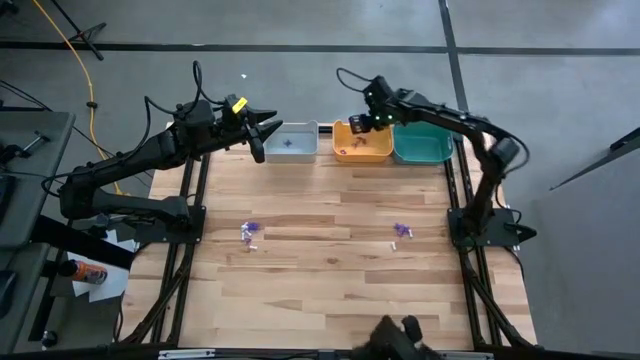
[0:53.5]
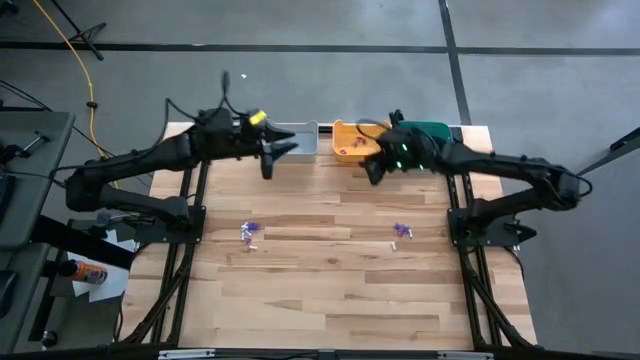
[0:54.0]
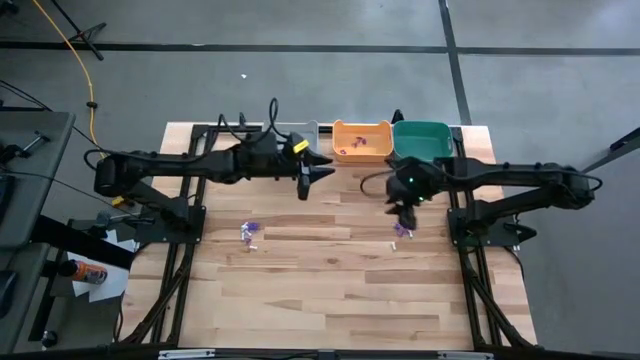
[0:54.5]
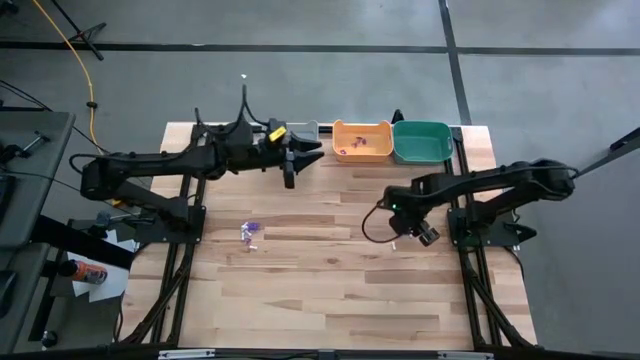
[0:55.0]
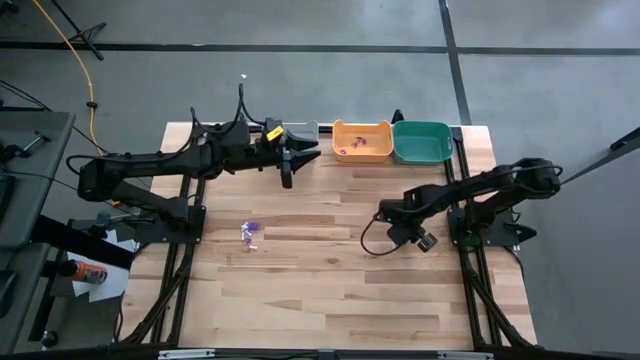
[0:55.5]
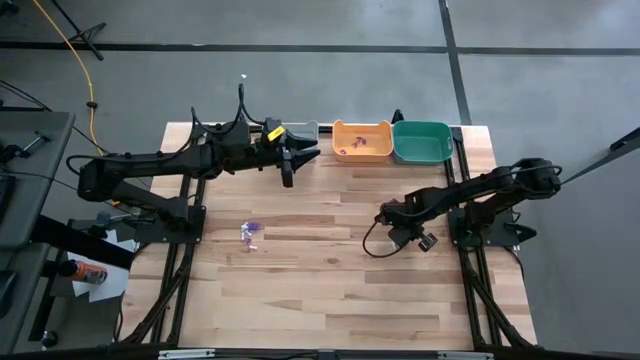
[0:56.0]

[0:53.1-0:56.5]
Task: Sort Halloween decoration
Put the purple witch hat toy into the orange bin

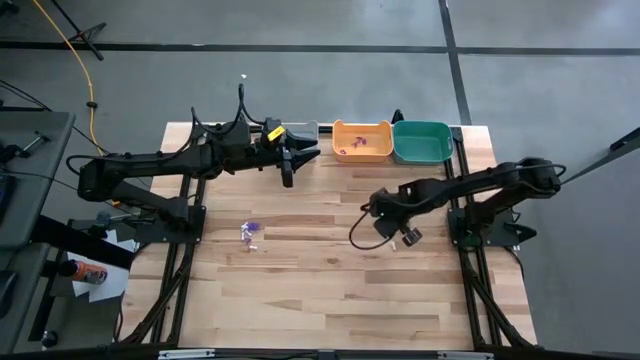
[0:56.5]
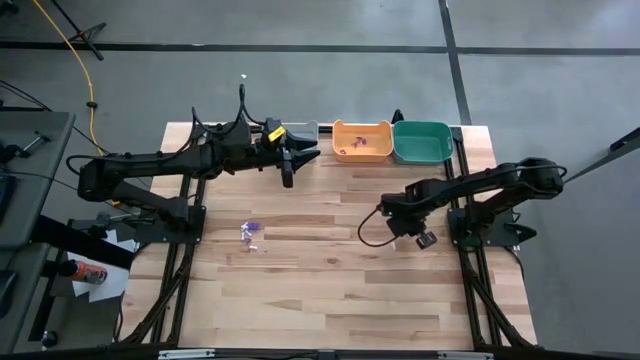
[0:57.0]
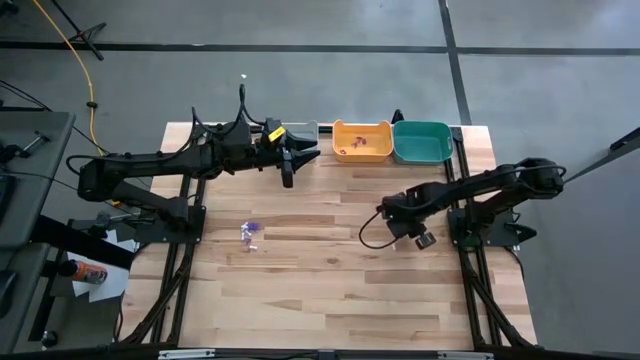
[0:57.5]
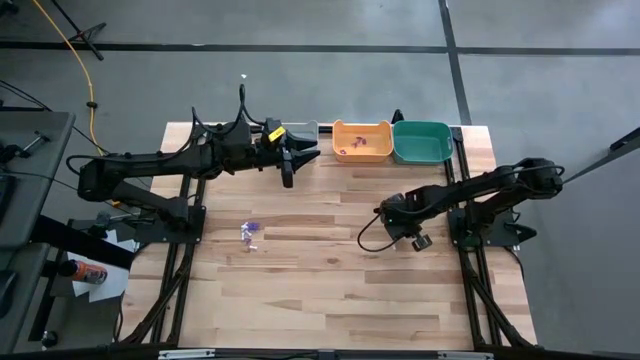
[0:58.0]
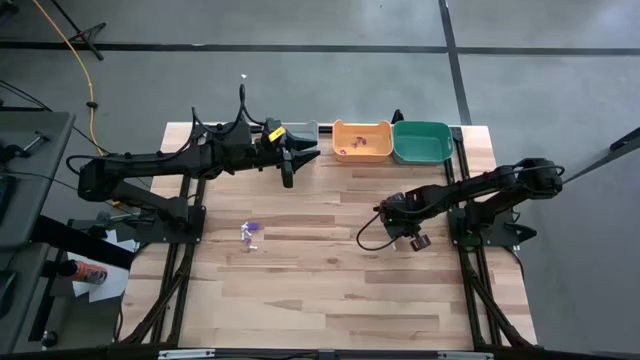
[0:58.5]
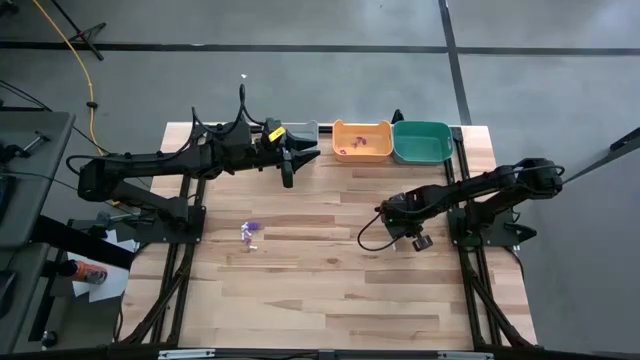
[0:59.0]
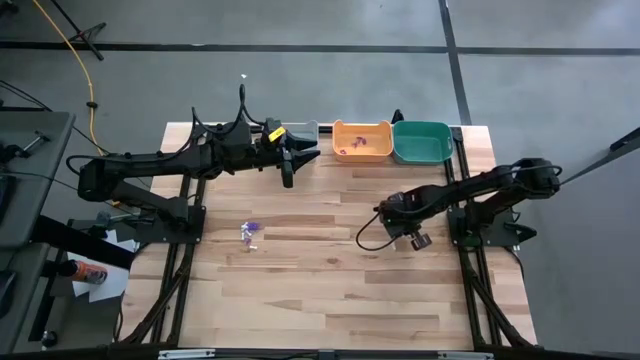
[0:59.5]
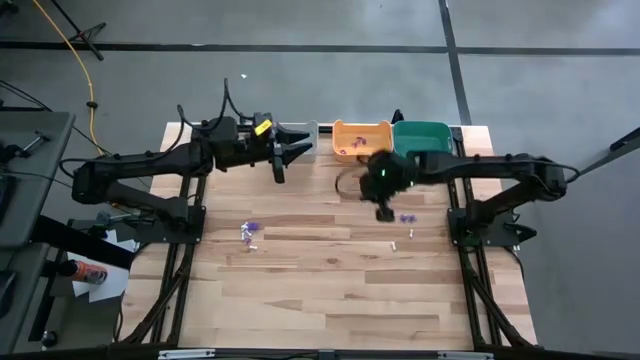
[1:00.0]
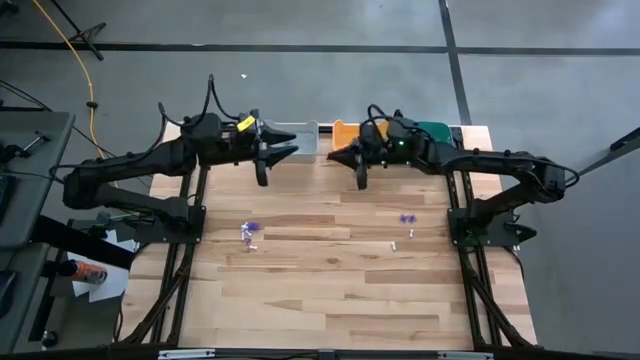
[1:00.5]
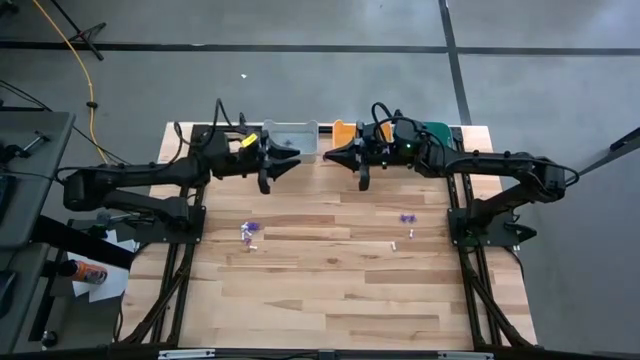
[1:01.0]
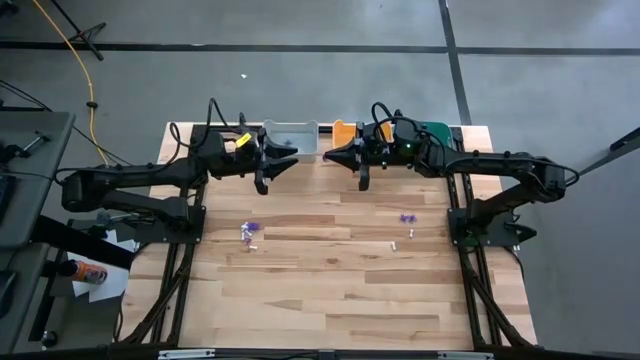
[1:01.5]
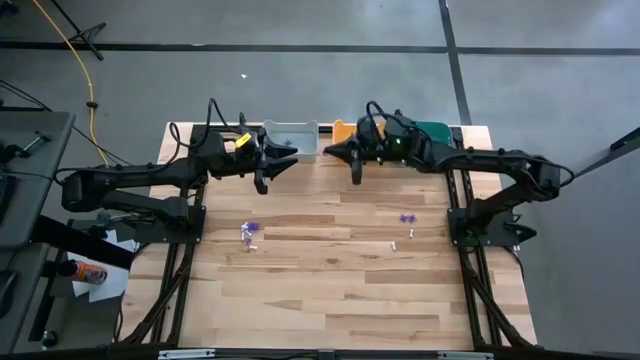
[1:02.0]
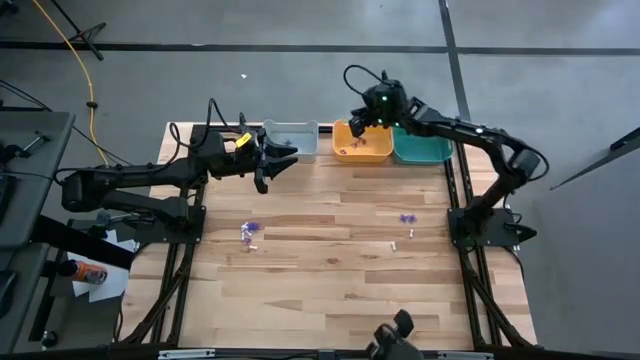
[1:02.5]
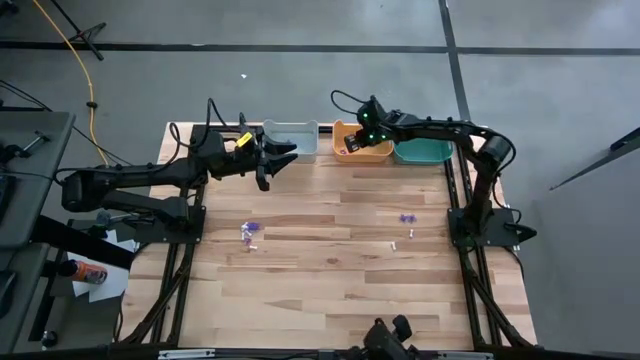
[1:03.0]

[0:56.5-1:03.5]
Put the purple witch hat toy into the orange bin

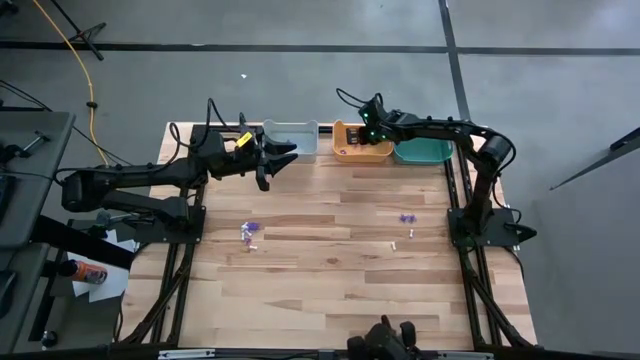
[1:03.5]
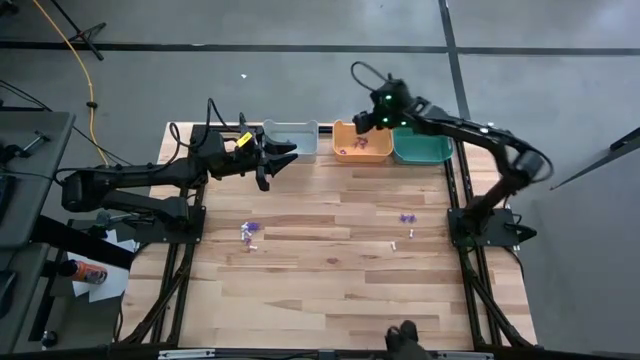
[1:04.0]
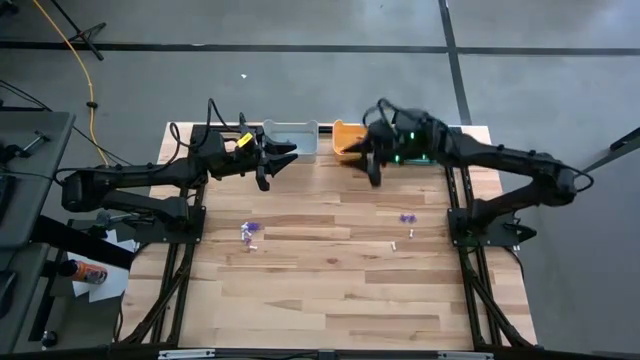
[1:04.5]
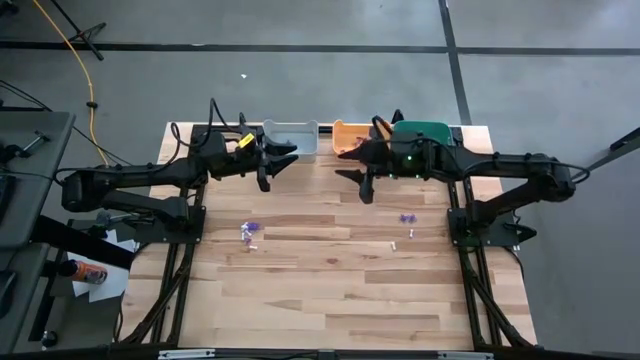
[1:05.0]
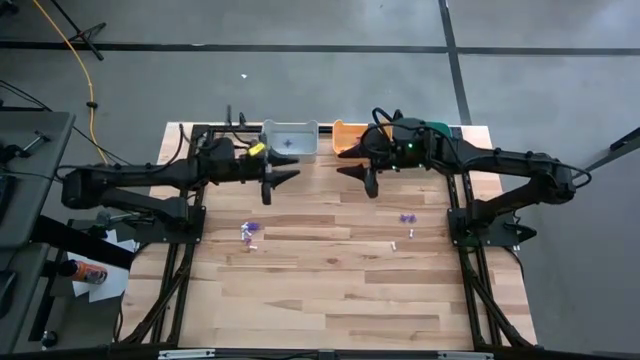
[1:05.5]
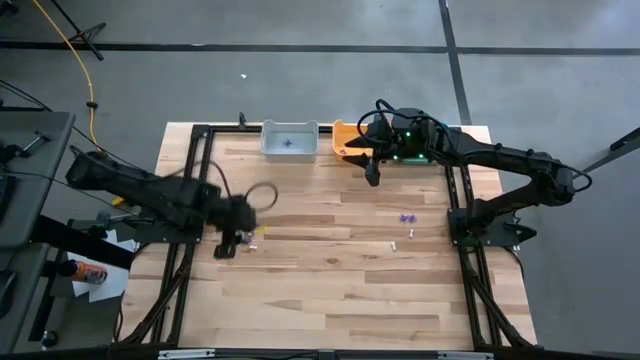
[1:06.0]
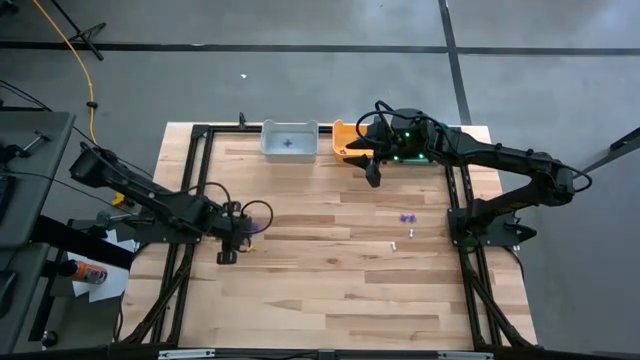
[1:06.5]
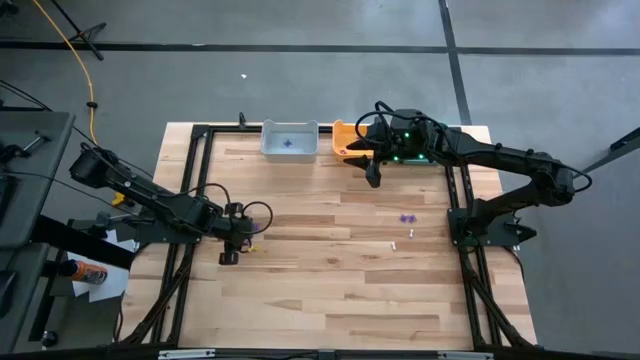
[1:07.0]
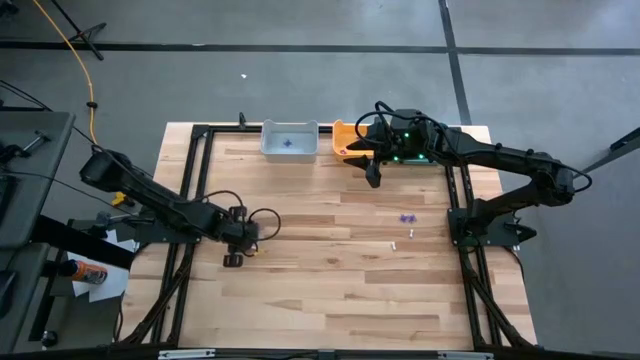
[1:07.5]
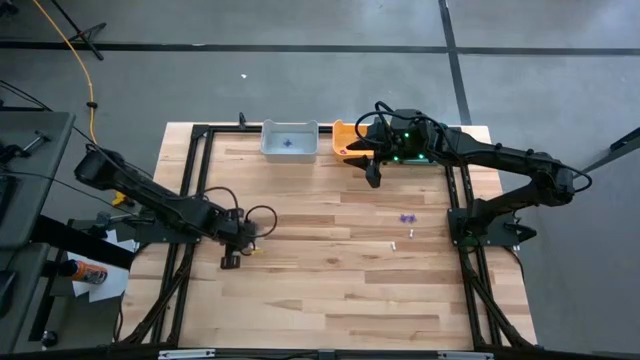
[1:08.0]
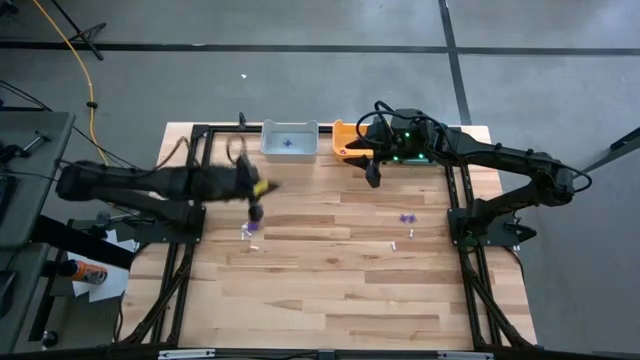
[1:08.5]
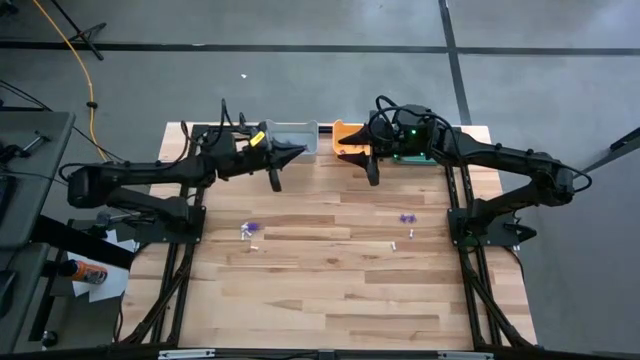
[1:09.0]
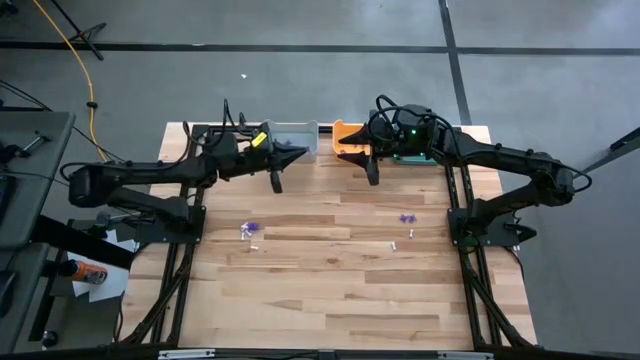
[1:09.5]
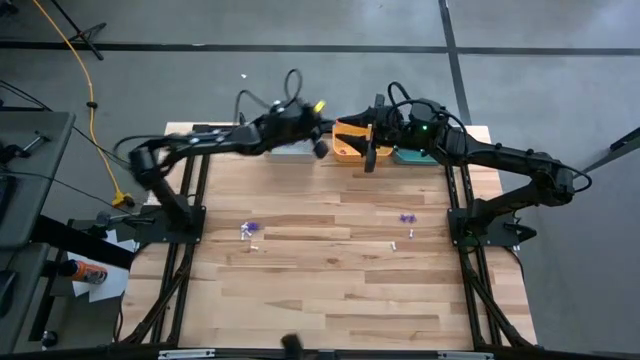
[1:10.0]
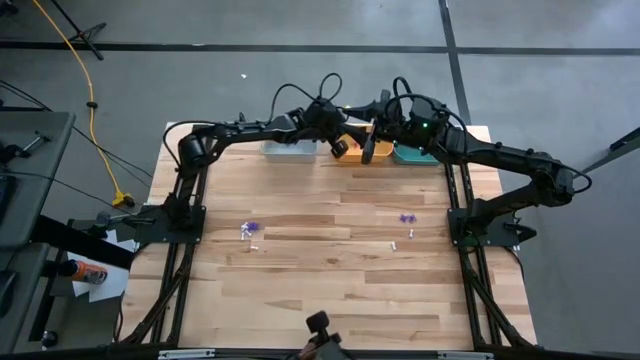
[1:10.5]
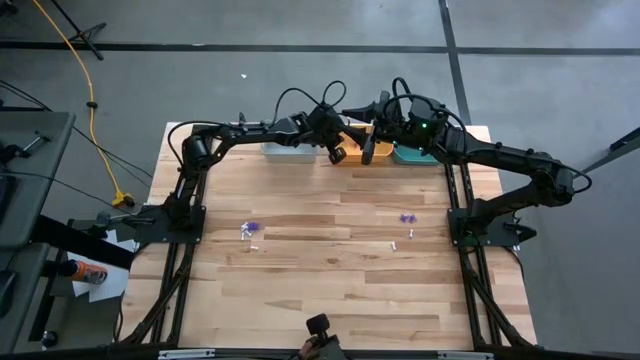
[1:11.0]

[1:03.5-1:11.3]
Put the purple witch hat toy into the orange bin
